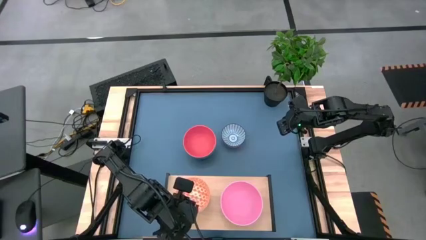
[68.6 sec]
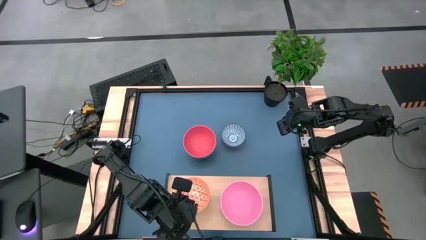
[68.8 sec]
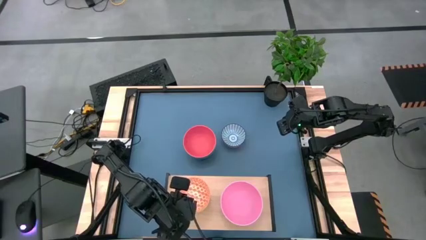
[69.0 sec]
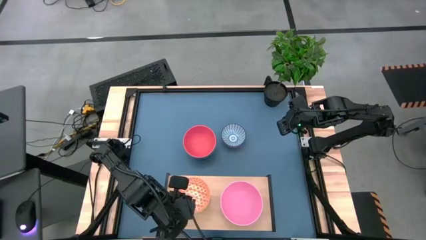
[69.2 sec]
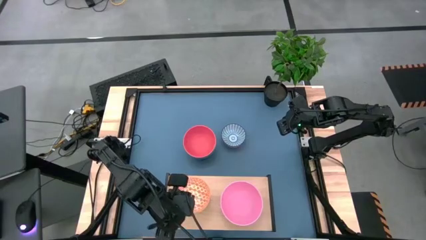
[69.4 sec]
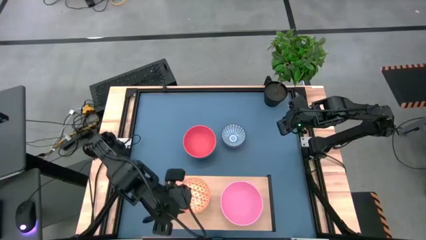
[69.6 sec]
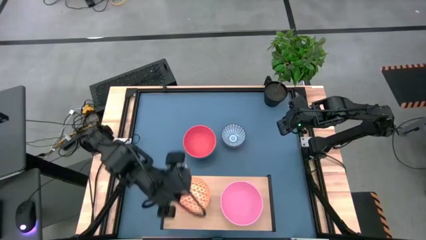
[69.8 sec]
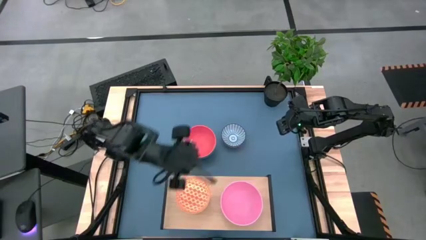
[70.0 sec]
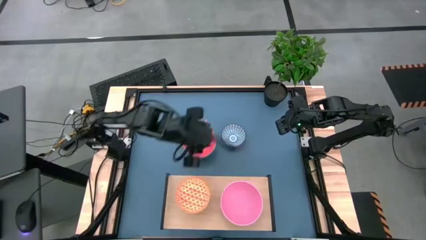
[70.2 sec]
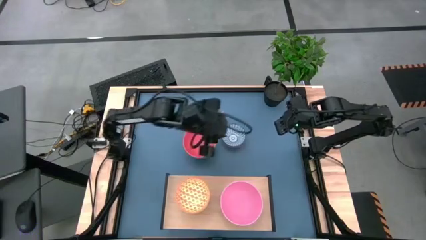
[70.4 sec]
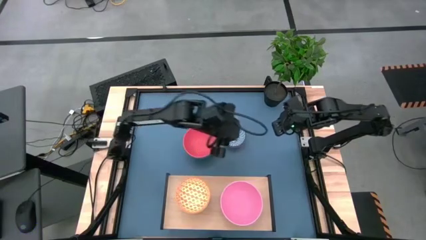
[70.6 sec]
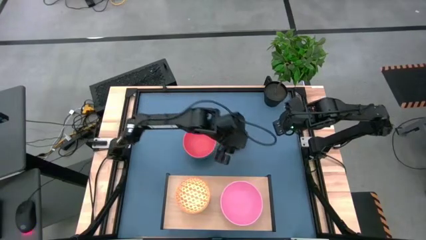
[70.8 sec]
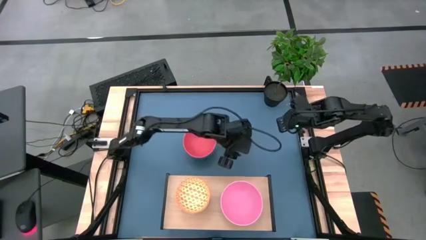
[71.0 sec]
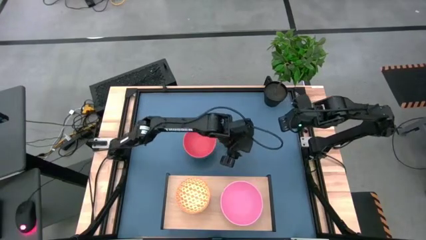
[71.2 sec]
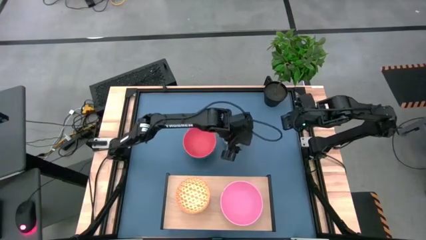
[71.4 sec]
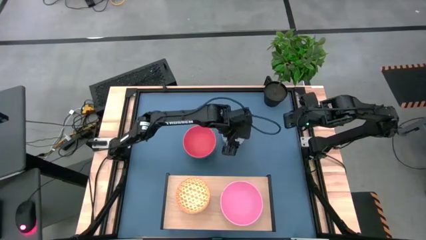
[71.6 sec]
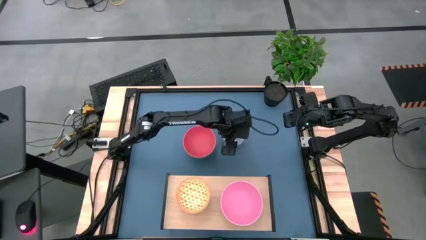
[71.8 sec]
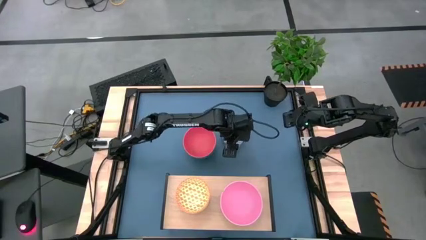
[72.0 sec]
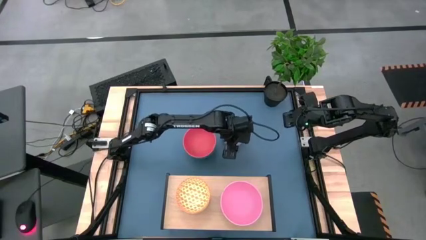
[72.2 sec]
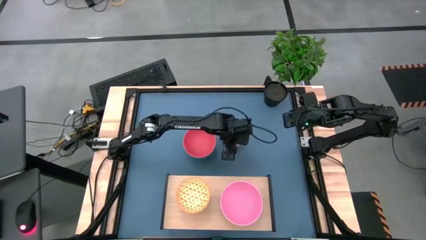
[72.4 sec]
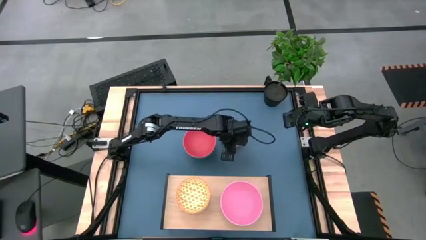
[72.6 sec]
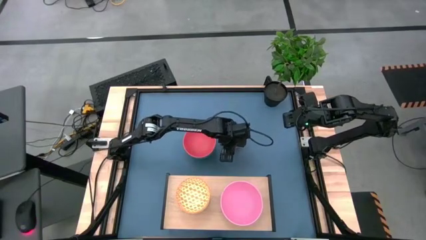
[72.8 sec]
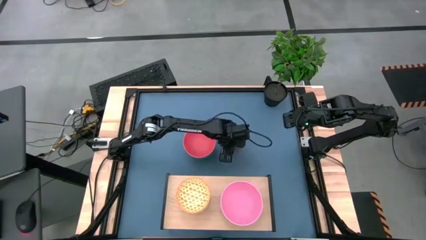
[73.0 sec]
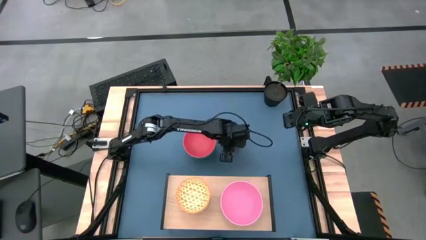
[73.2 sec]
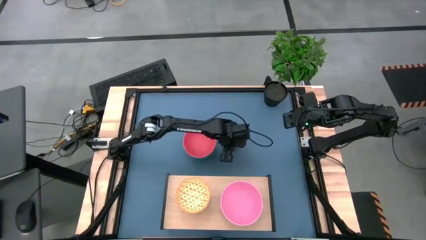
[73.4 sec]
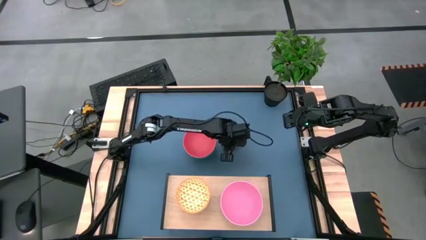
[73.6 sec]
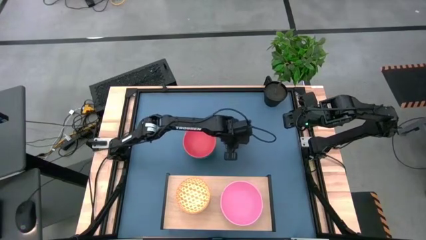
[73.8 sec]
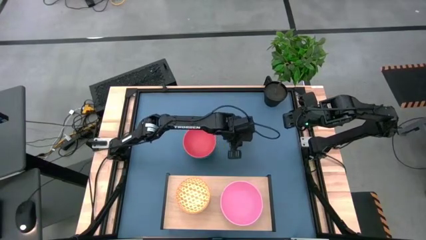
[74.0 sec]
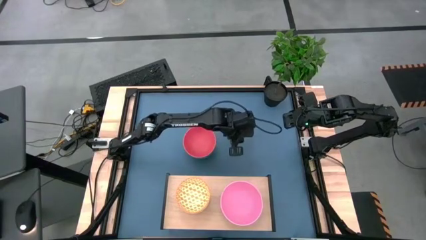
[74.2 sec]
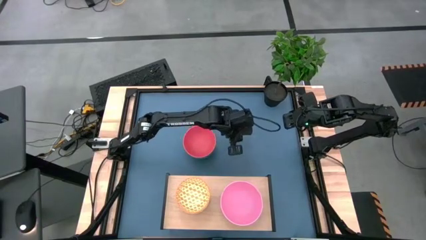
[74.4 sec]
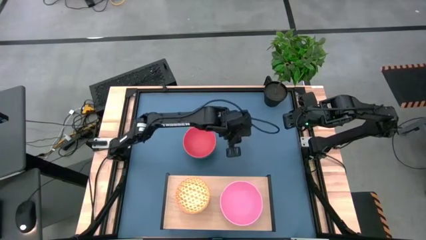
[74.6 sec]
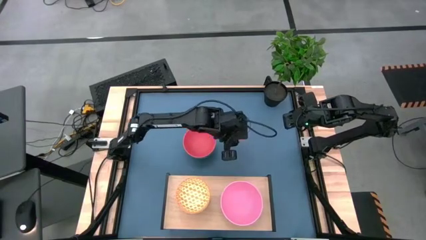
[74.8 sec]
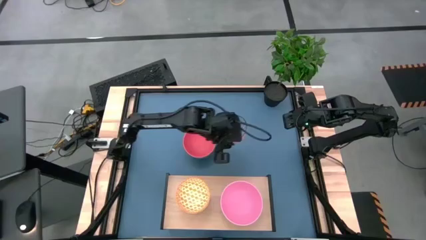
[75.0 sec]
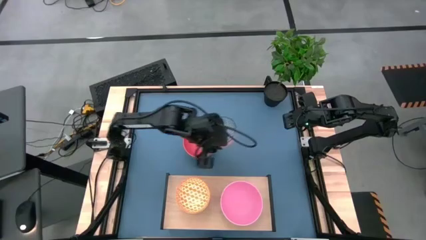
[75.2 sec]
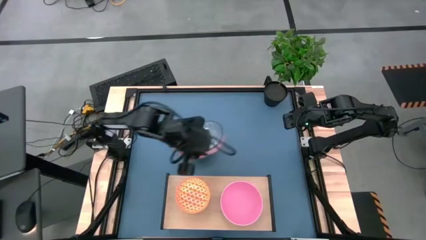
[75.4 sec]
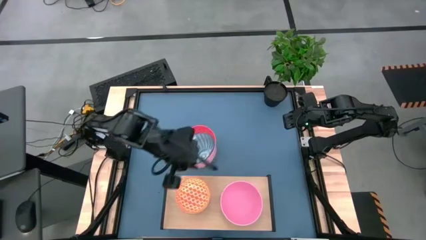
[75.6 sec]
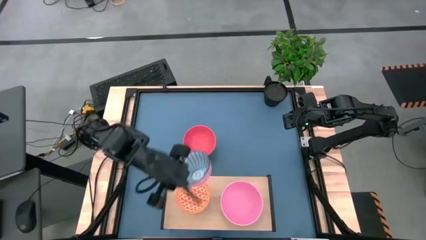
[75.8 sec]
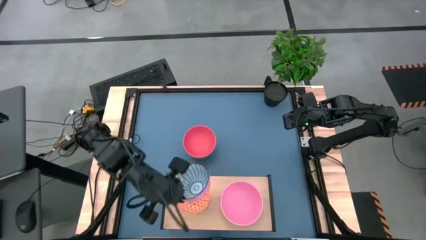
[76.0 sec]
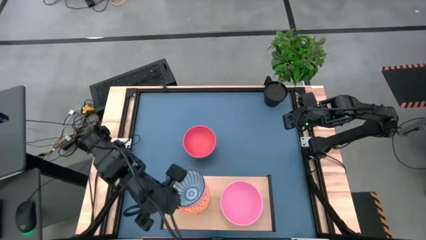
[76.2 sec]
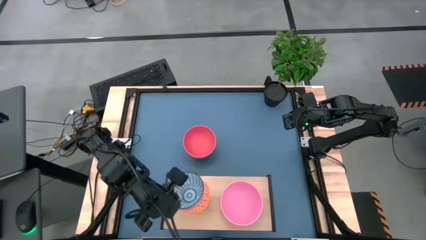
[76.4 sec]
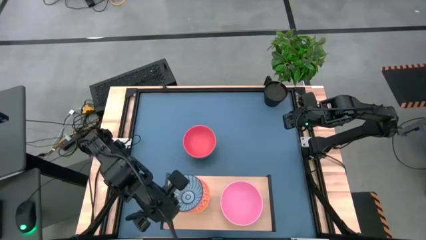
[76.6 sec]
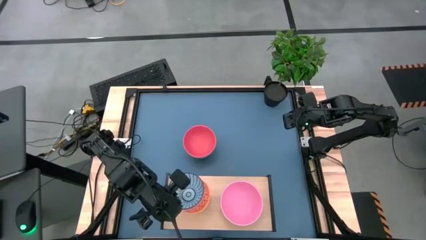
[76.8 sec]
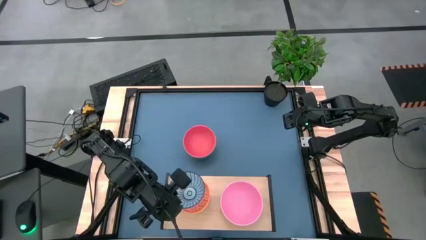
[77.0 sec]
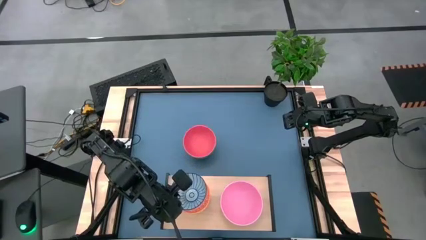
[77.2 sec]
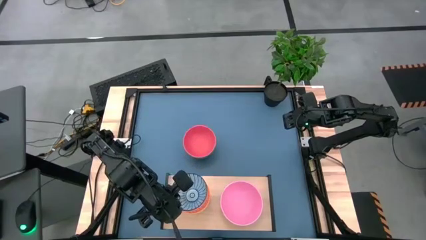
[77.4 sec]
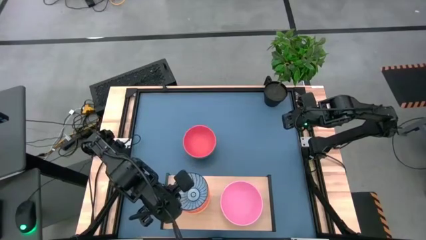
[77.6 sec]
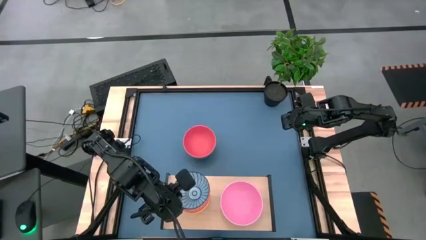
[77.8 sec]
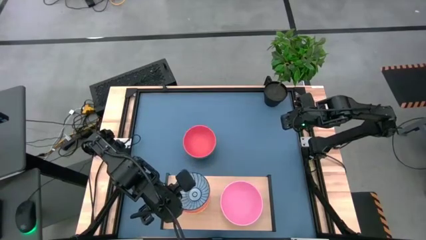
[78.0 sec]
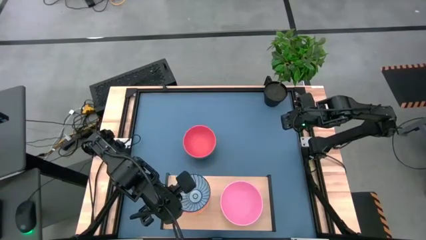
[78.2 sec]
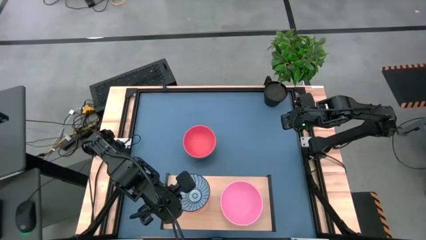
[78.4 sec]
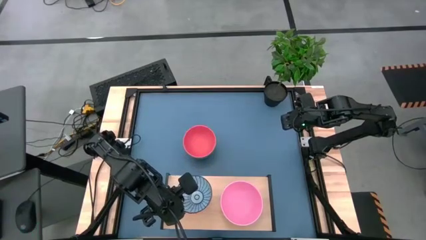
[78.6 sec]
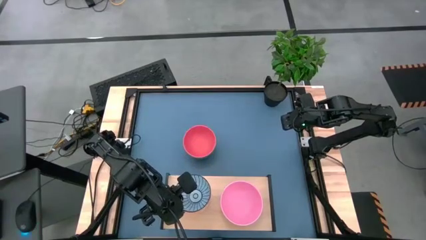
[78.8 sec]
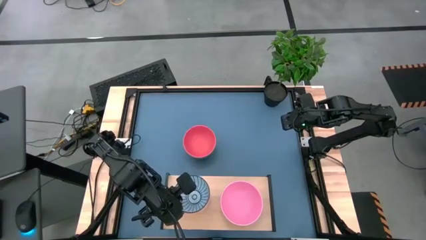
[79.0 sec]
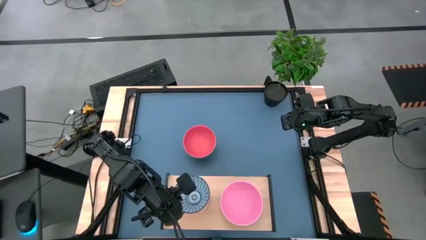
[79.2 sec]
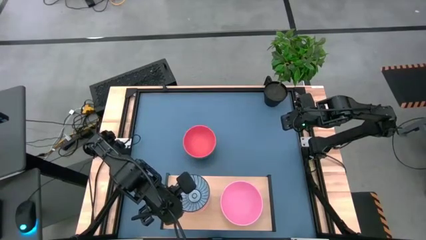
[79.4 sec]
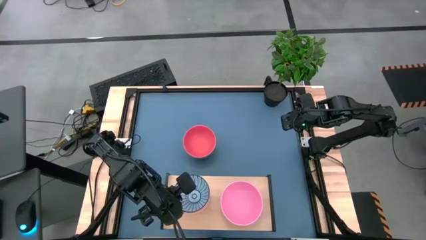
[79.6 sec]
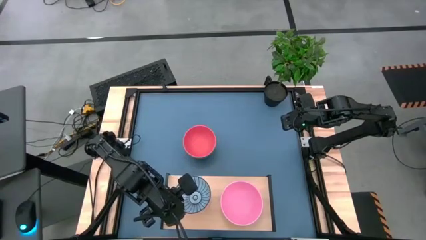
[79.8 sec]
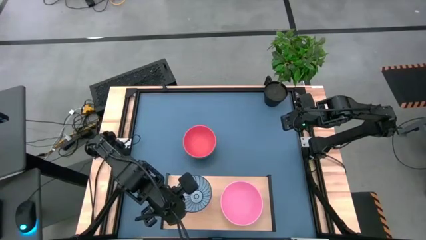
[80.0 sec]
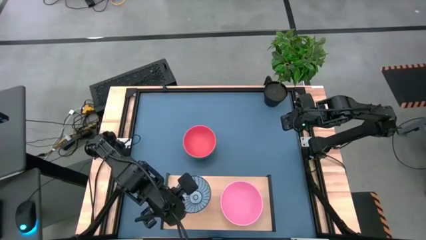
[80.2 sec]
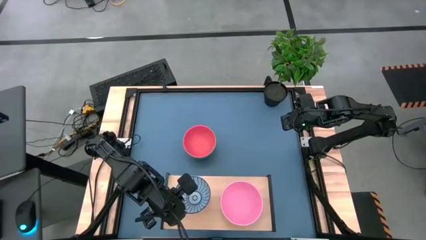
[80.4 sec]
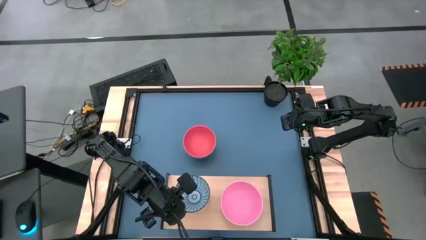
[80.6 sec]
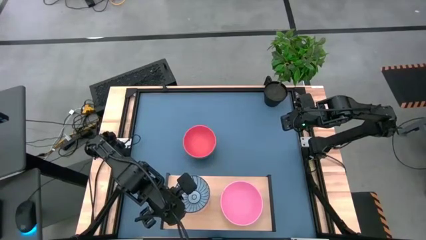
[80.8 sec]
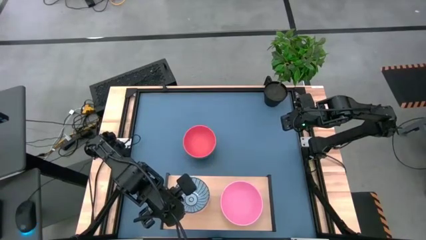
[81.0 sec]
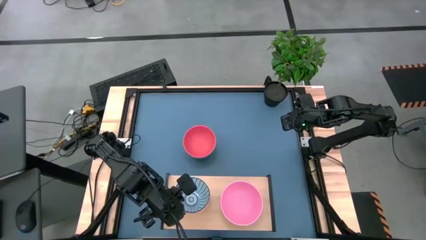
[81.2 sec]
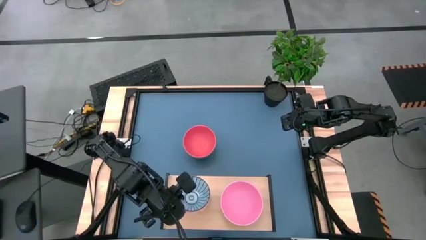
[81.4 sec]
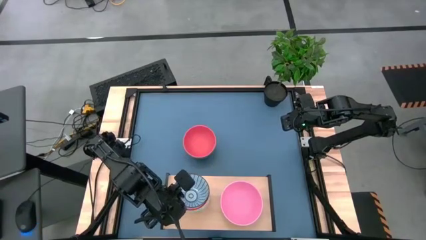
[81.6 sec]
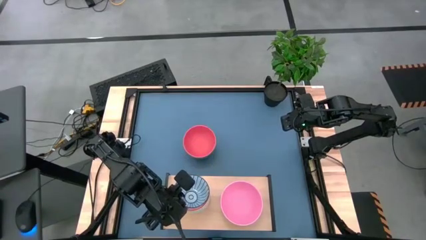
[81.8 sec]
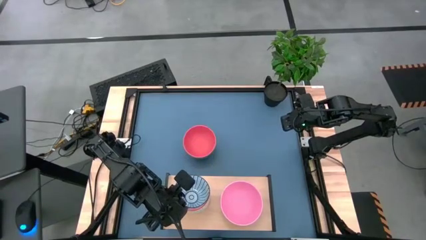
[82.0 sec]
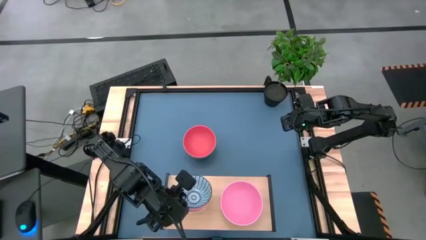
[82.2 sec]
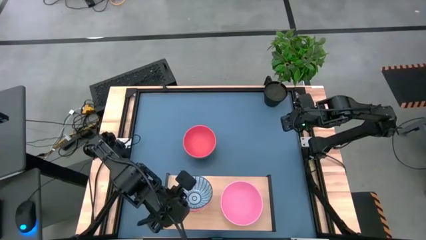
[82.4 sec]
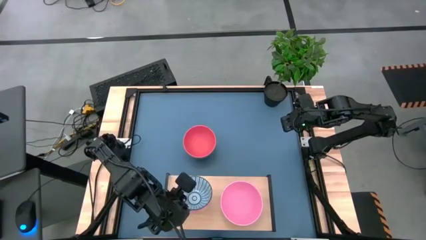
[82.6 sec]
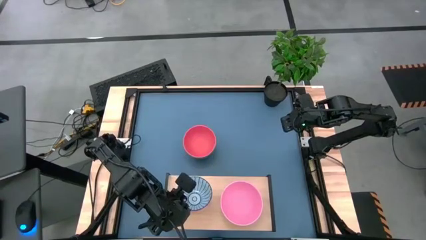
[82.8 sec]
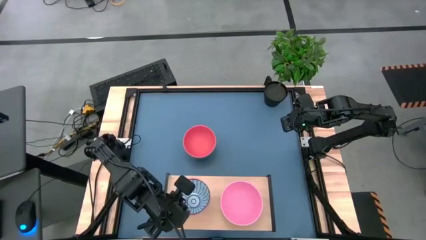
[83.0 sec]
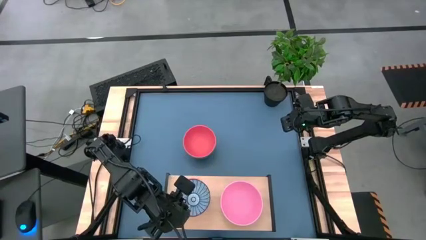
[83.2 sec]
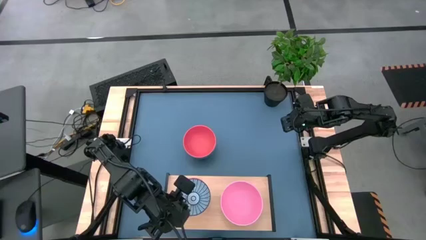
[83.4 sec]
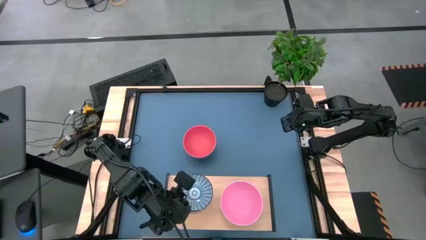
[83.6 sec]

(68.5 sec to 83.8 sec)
Task: Place and stack bowls onto a shelf
Stack the blue patterned bowl on top of the orange patterned bowl on the shelf
